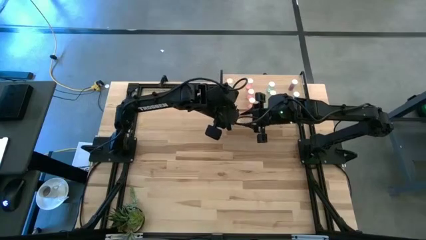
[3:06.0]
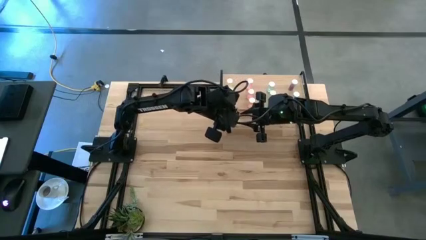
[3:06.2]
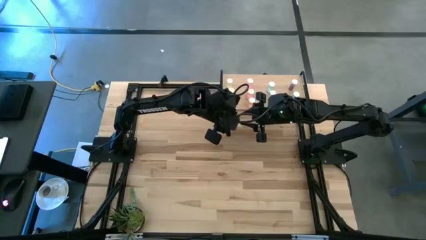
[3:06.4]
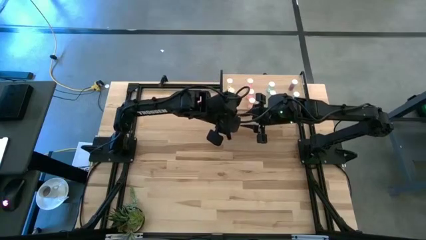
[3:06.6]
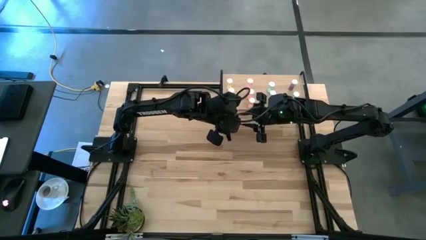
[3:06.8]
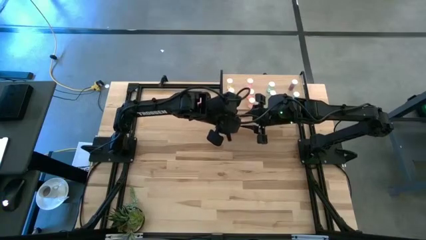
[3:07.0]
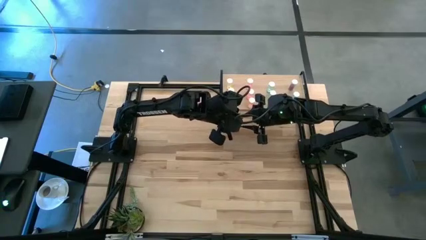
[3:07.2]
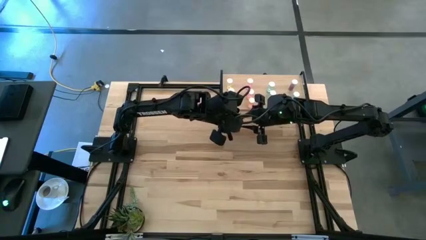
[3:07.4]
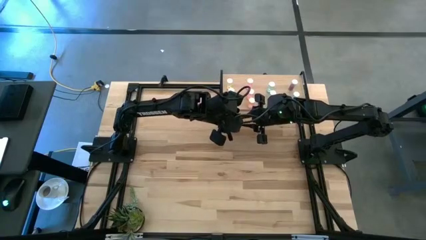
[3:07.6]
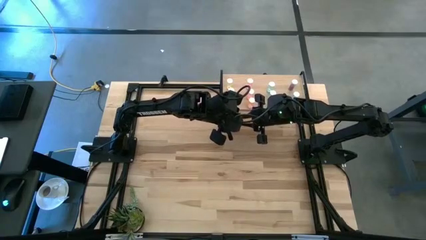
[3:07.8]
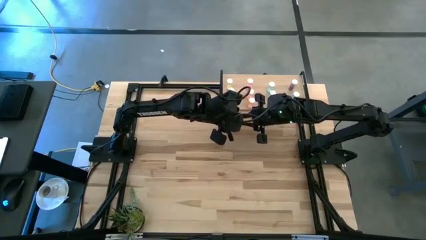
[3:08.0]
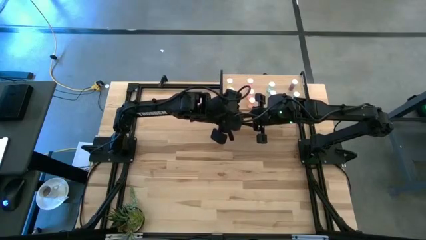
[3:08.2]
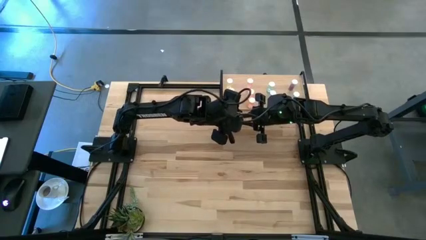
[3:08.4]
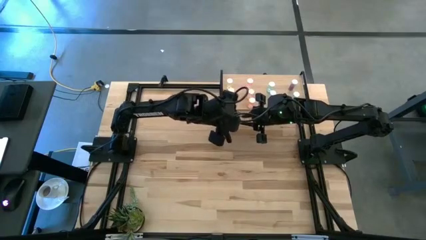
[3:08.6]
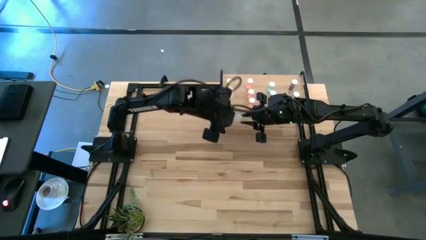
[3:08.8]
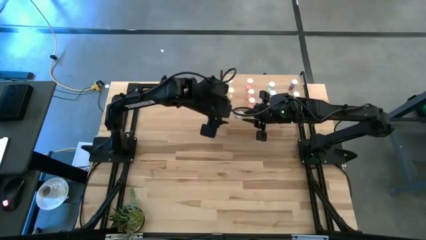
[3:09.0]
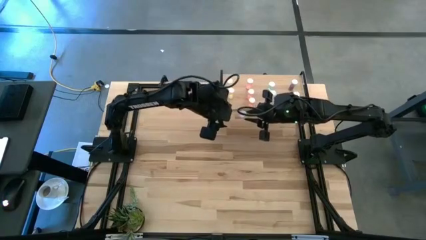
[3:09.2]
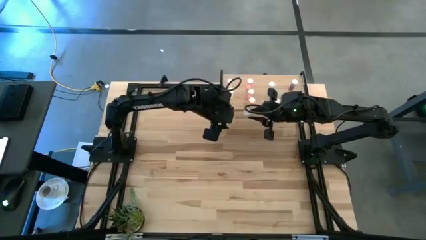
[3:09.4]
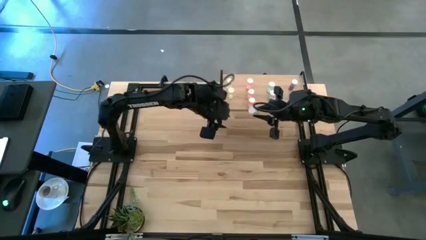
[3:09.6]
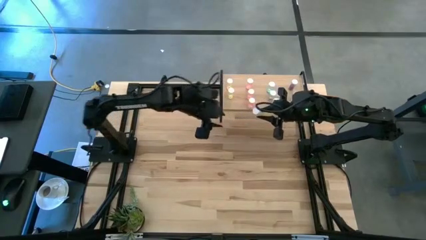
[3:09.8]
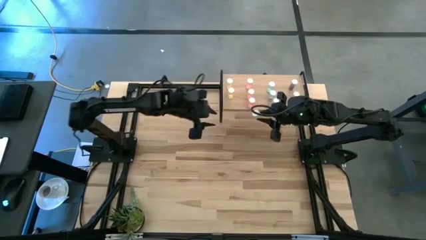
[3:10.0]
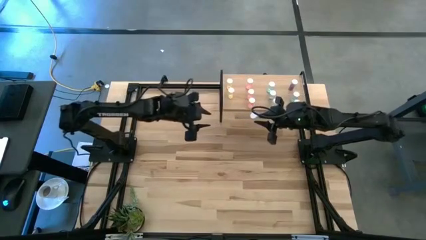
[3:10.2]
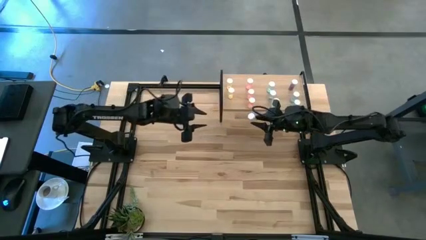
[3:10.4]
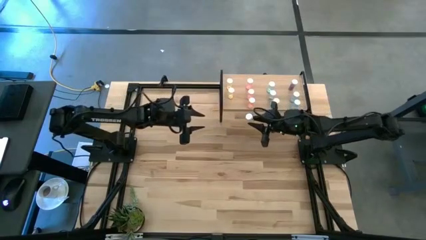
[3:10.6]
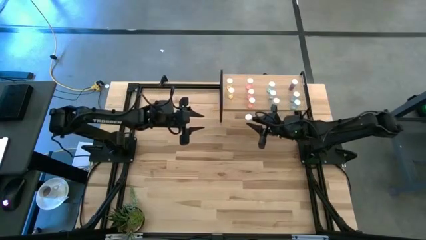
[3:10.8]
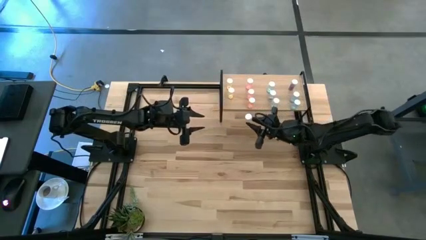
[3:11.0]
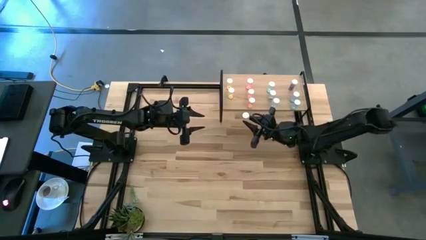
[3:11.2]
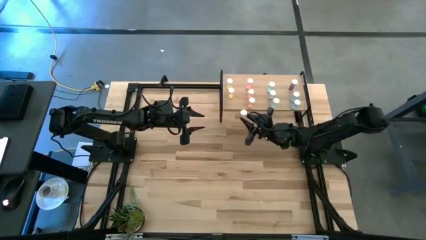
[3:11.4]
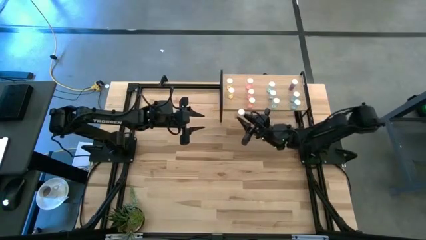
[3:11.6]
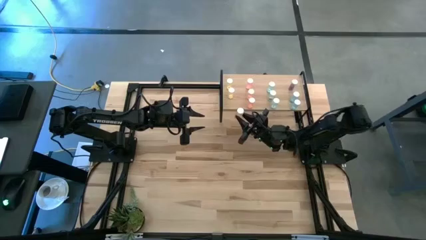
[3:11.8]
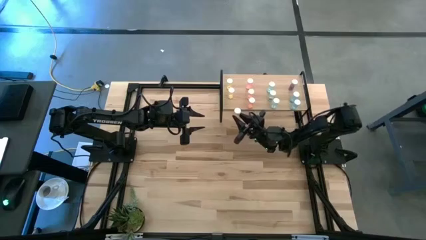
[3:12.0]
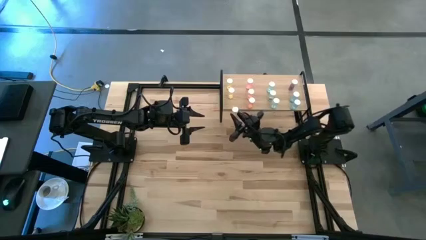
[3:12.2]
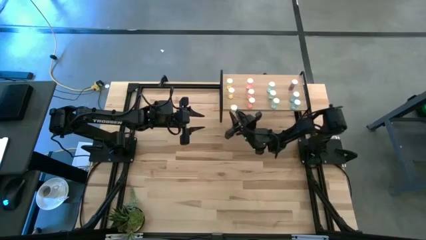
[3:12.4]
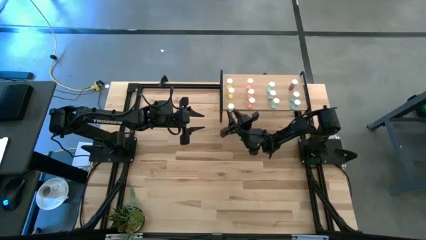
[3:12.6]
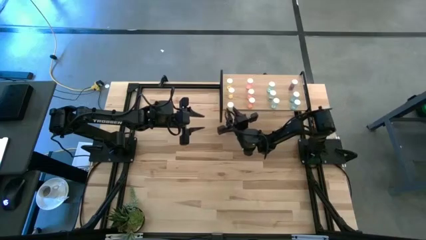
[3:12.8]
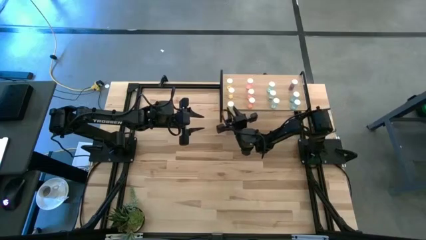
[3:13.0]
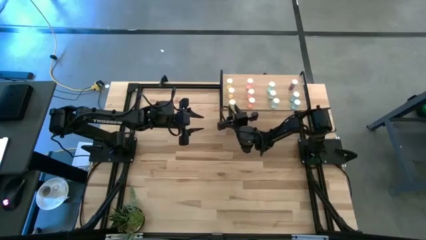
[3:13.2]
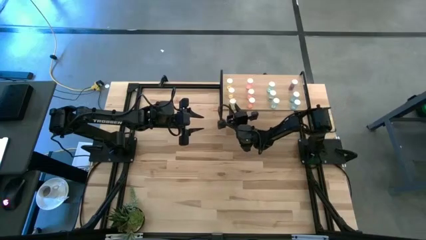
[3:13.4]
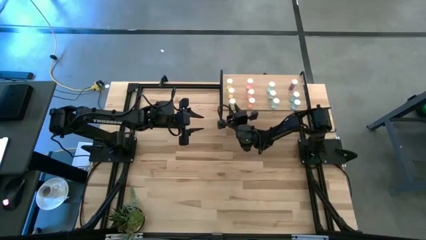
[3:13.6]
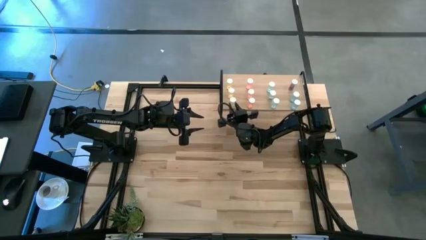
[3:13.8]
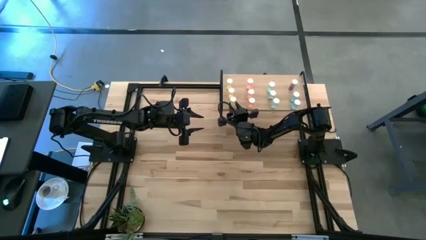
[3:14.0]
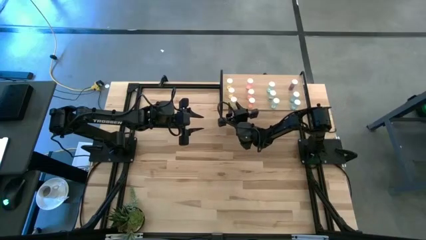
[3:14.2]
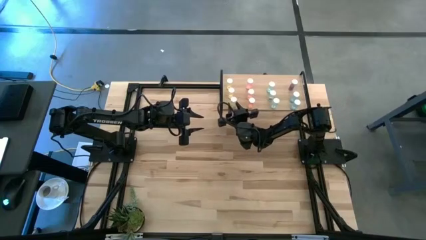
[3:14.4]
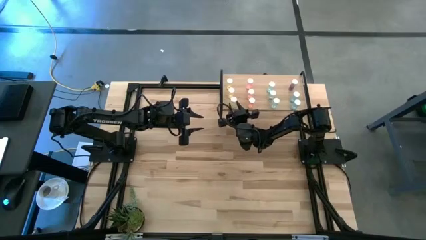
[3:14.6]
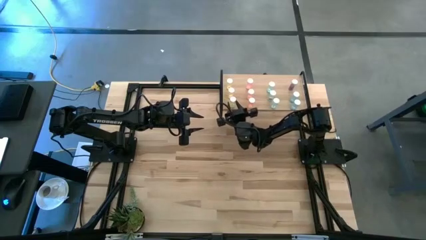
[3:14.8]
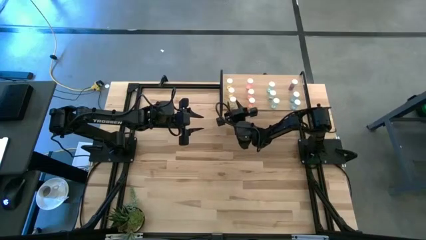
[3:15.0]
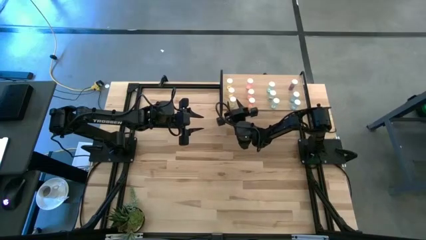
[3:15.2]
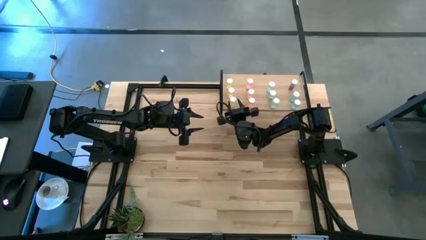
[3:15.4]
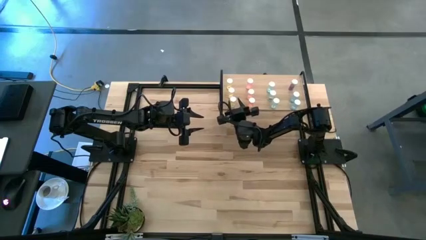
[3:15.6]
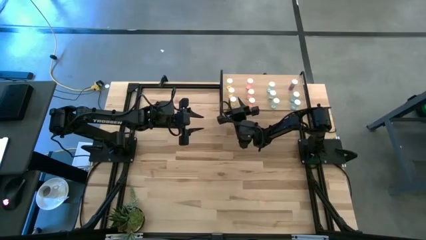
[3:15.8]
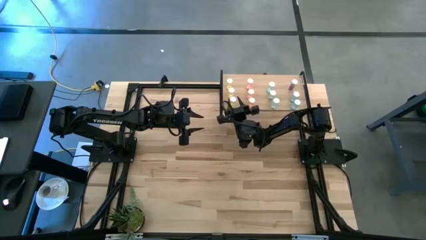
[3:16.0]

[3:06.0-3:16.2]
Task: Pick and place medicine bottles onto shelf by color
Put the yellow pill bottle on the shelf aligned with the other yellow pill bottles

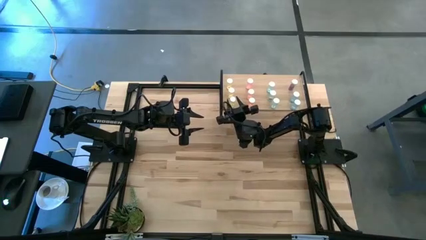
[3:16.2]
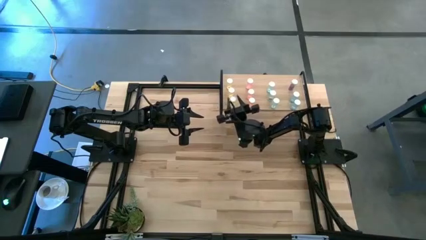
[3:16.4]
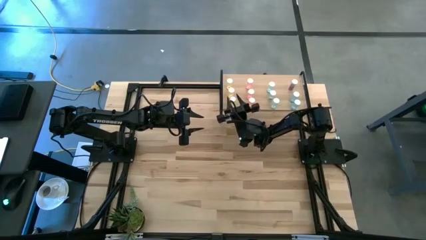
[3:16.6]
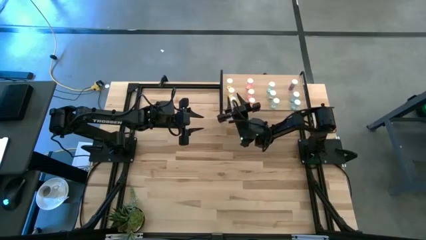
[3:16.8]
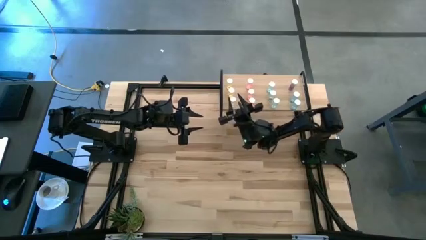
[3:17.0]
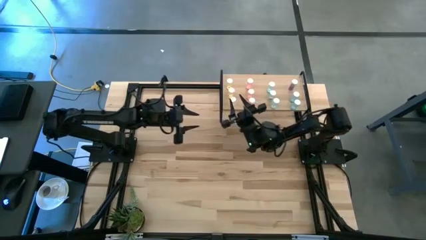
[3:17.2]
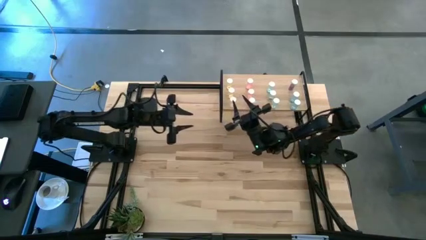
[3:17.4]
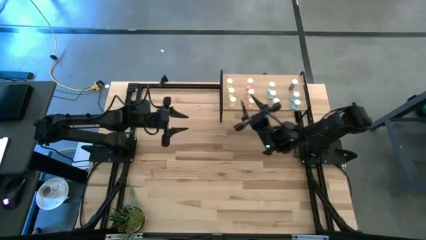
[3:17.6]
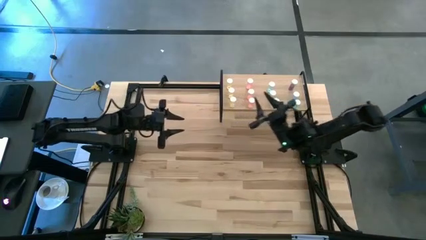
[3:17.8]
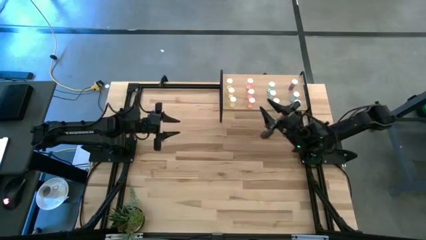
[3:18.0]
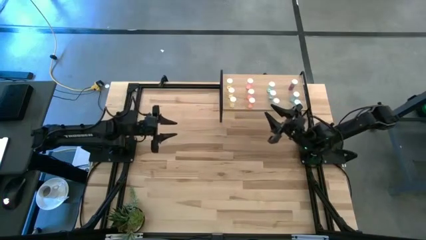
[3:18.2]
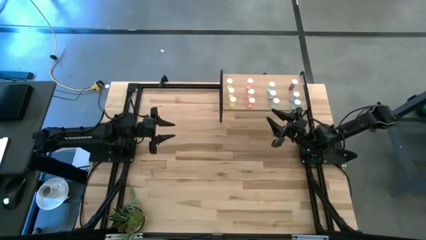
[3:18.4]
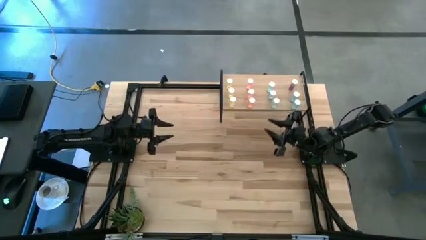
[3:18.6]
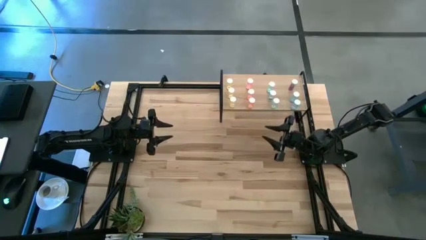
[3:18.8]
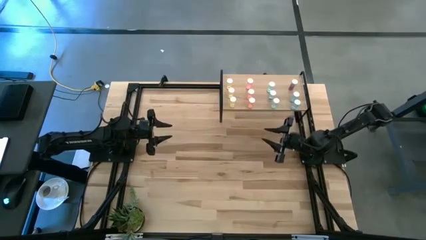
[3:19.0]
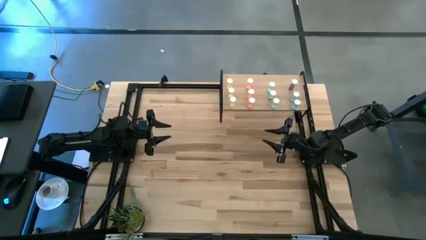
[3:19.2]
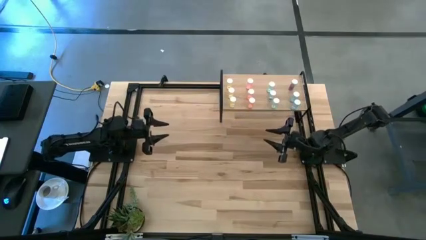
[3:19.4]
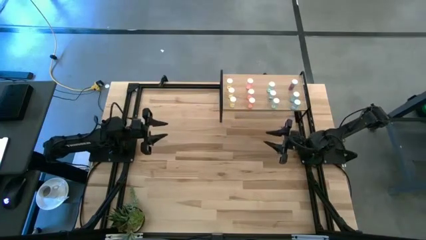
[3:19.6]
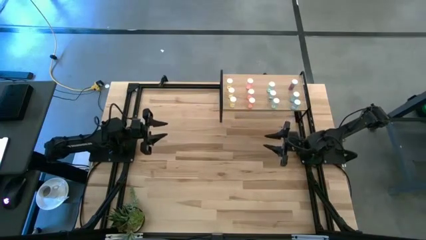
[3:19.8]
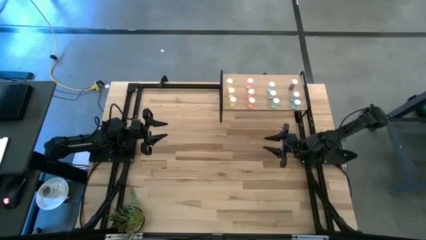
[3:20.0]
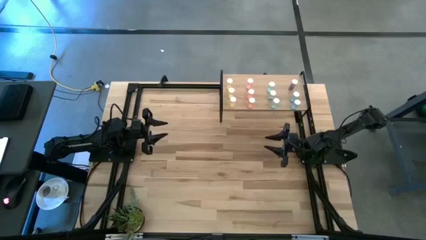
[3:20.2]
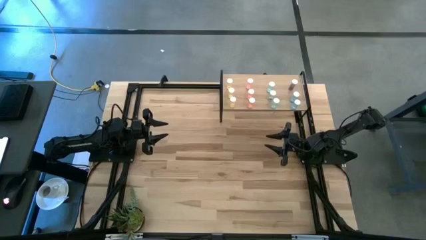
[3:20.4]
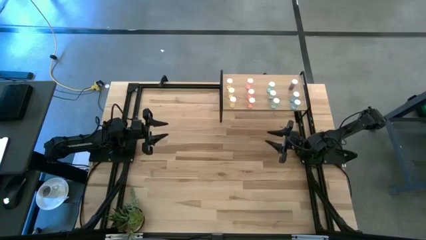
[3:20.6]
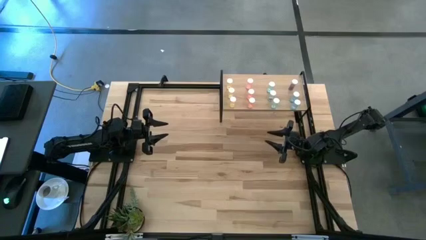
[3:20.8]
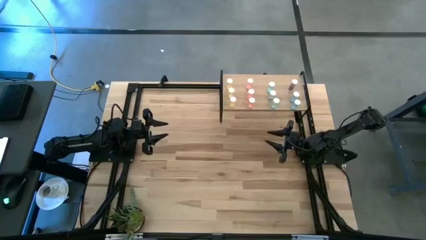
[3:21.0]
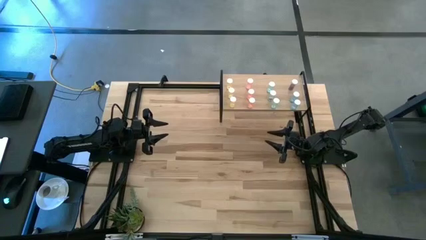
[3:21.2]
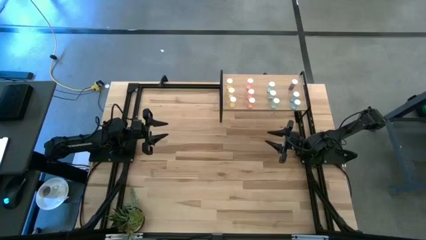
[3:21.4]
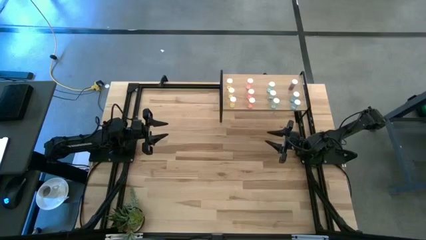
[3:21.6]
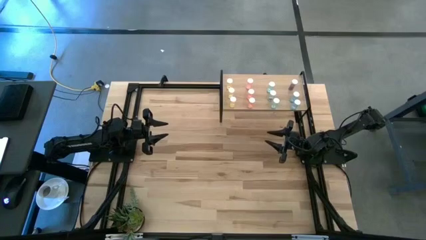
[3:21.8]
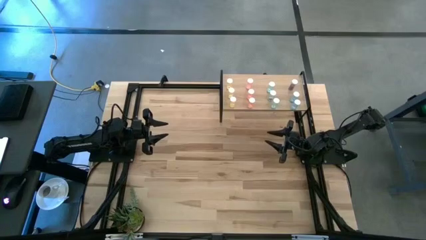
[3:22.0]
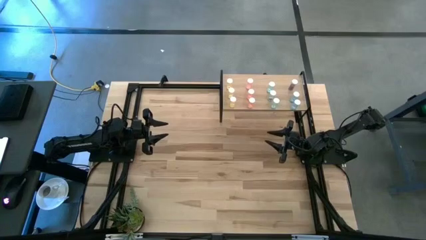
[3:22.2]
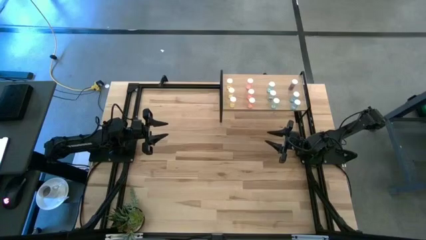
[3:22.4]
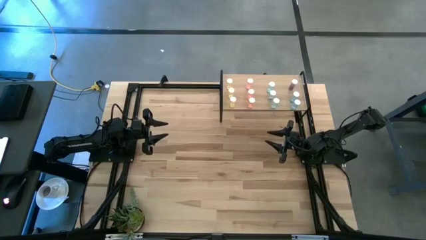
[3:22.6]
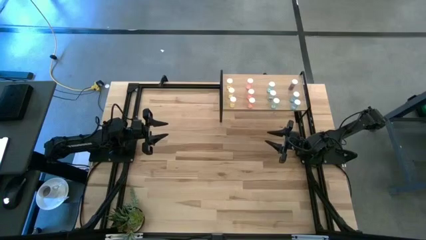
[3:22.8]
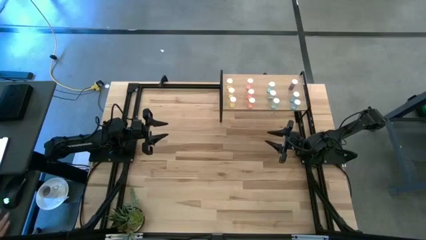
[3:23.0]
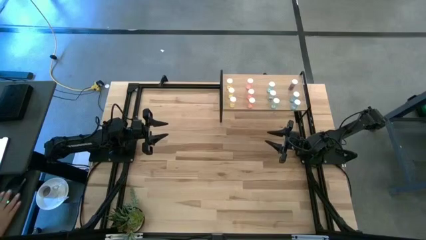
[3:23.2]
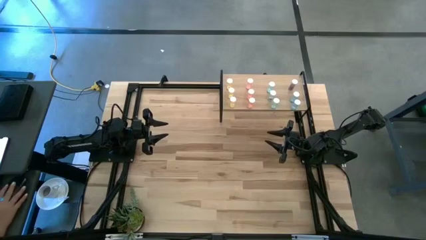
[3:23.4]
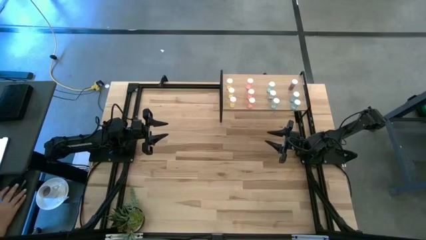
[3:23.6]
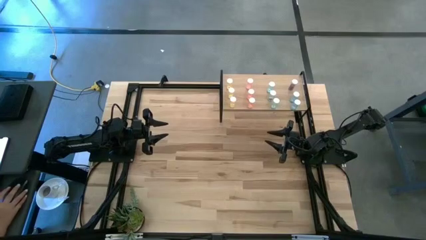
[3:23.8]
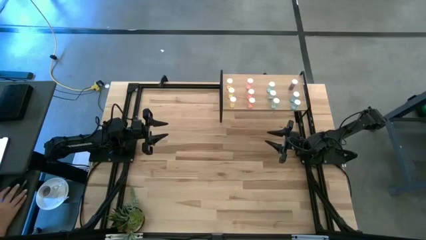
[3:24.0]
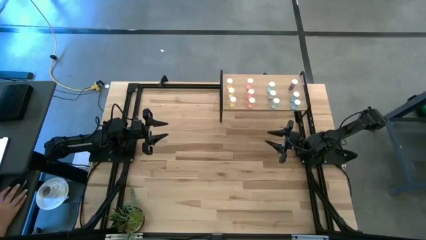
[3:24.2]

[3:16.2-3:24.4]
Return to Home Position
